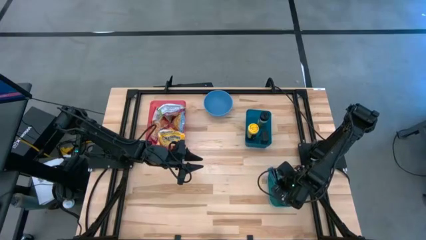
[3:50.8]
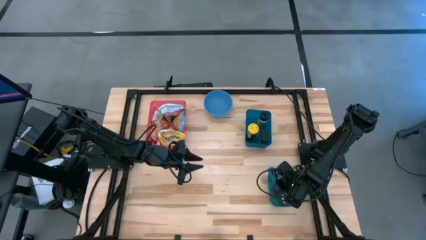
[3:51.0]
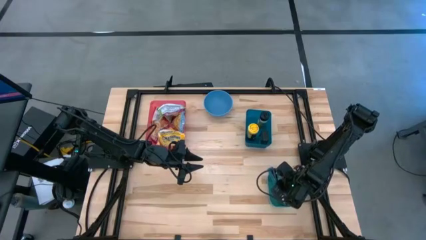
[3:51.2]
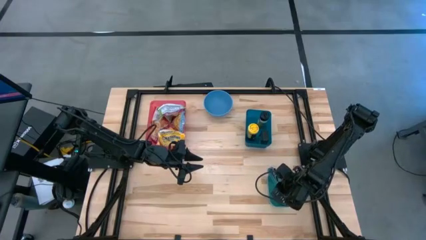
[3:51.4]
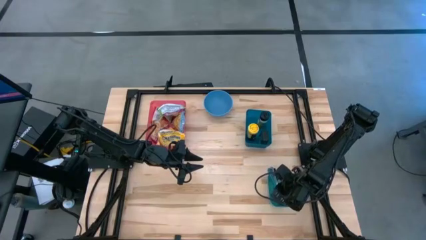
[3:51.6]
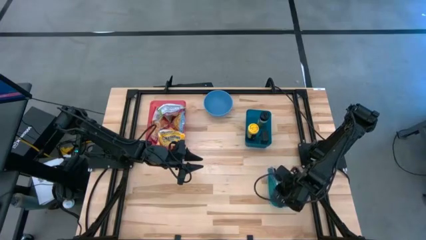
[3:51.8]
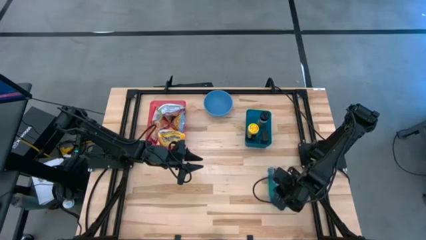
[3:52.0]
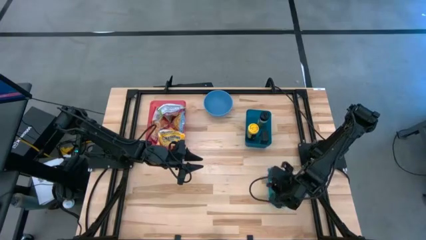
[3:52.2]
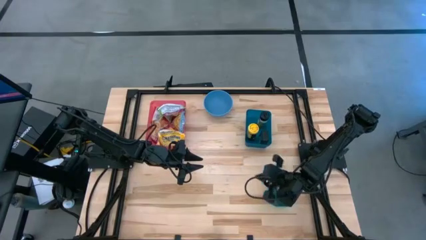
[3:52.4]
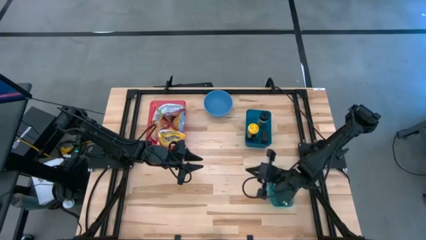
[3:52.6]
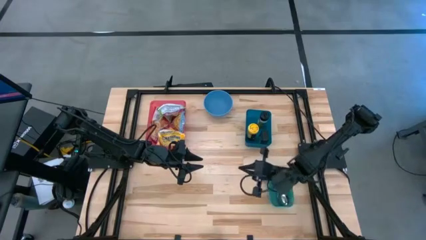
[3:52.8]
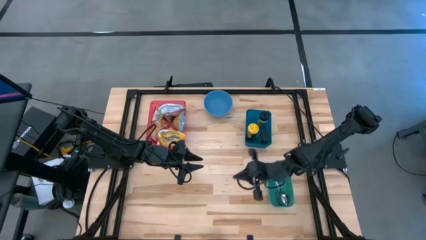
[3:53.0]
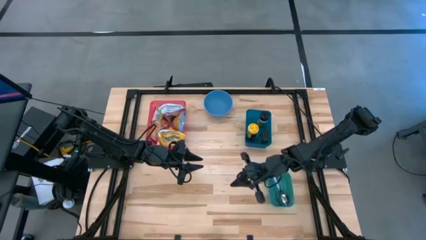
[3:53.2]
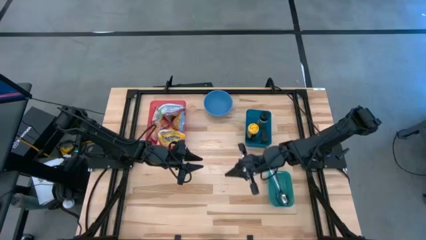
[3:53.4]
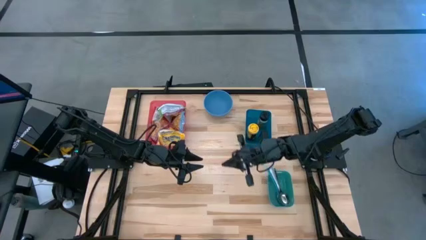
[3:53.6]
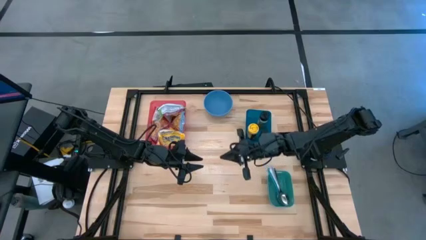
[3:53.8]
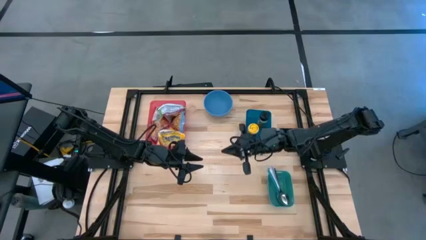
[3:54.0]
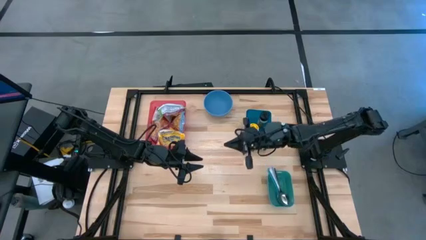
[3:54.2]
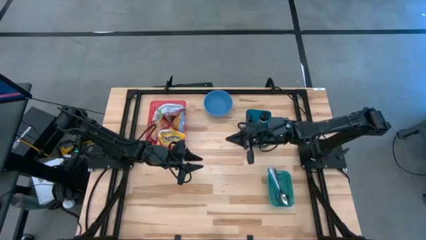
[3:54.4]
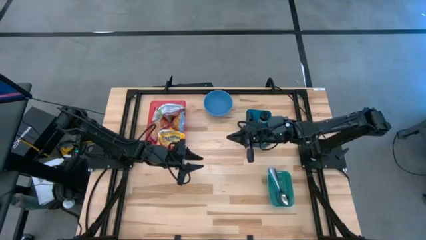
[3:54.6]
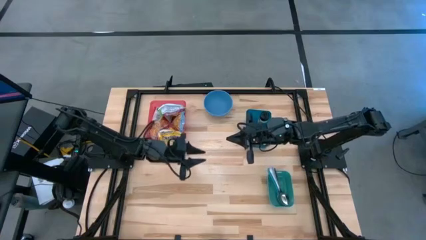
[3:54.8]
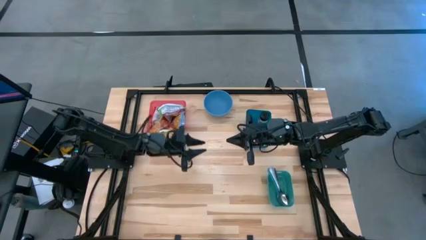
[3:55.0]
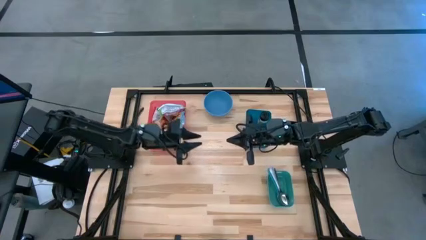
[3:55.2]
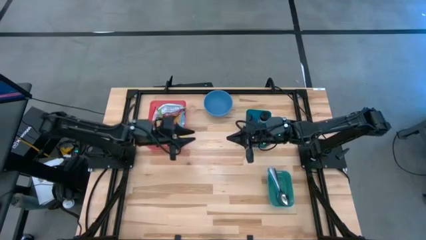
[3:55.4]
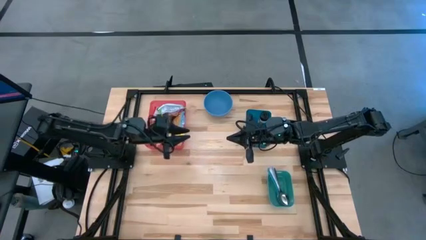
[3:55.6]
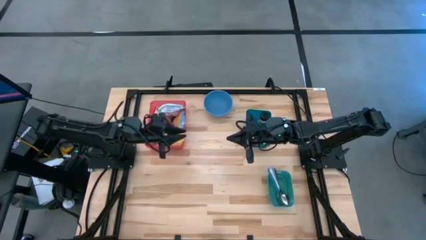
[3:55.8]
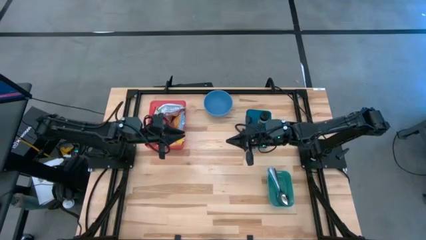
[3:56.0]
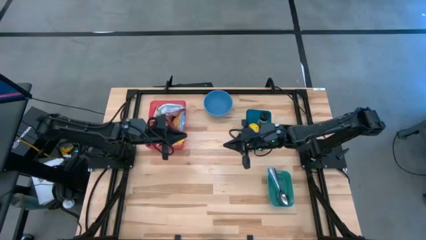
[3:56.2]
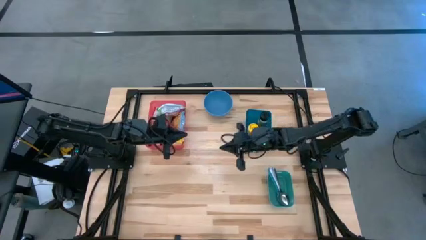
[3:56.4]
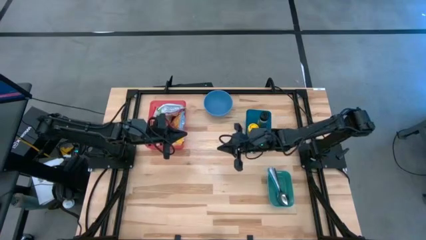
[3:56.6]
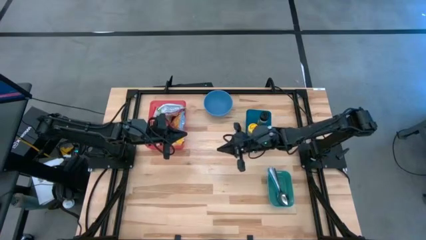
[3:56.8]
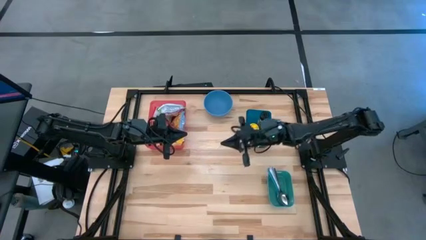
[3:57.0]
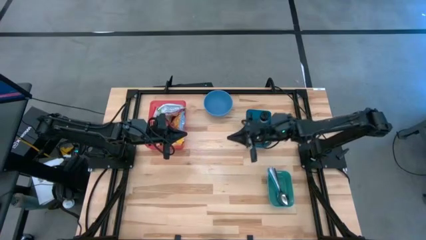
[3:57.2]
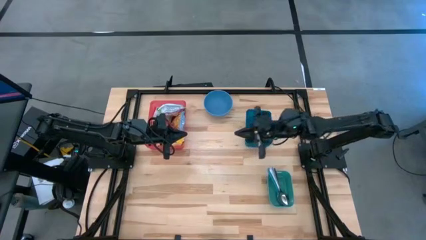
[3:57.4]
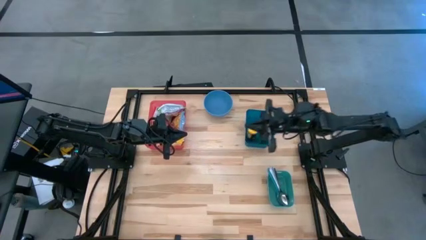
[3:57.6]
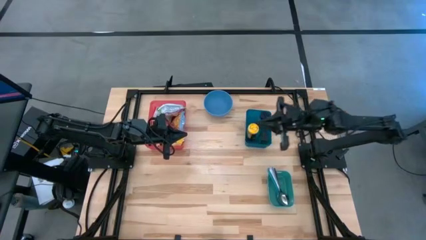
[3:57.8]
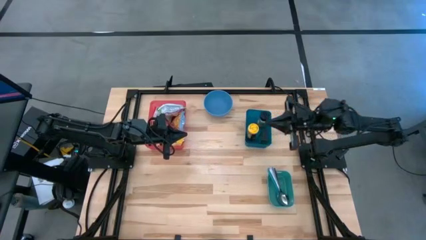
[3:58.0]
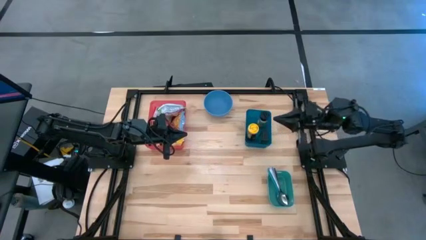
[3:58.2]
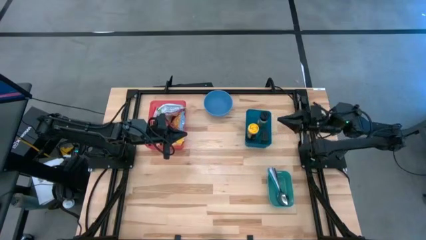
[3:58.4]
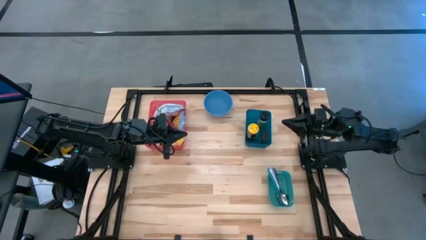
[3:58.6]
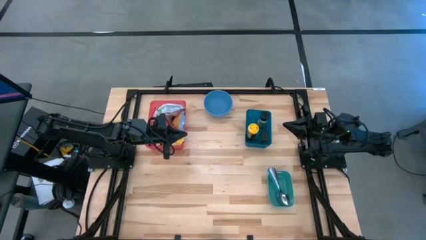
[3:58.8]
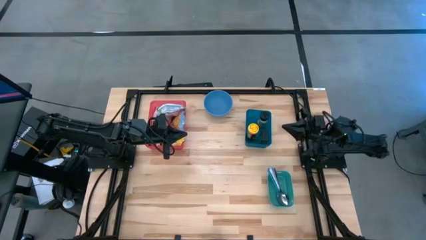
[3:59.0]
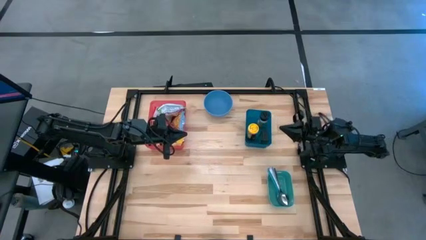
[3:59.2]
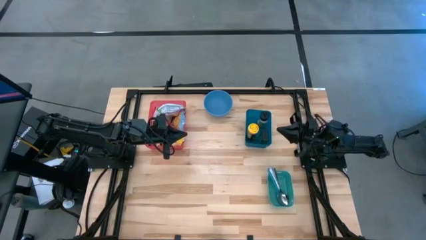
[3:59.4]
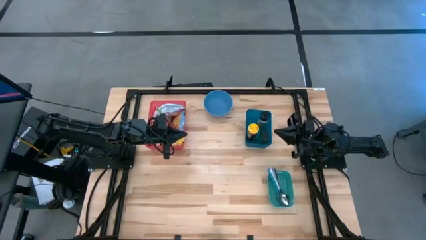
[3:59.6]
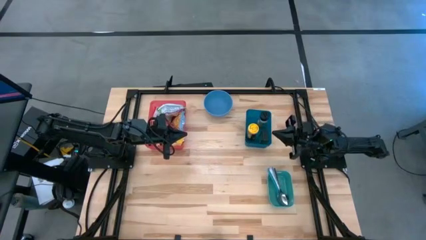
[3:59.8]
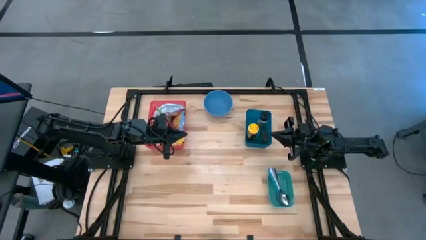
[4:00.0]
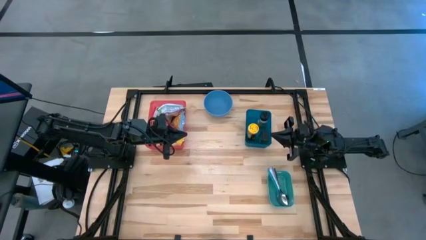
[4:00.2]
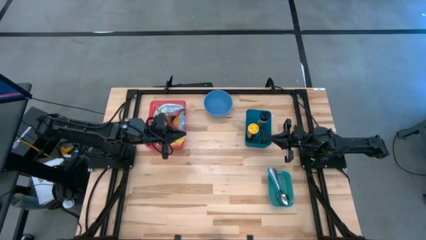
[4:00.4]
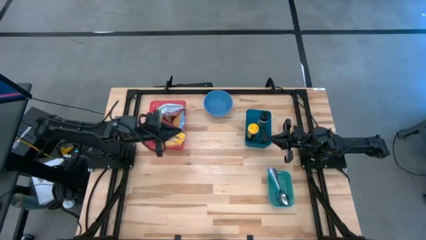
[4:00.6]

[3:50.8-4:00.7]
Task: Pick & Place Food Item
Return to Home Position

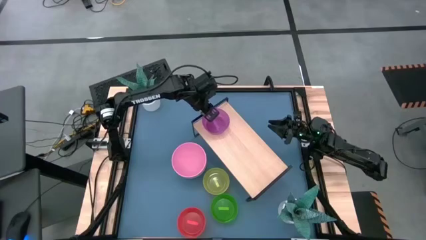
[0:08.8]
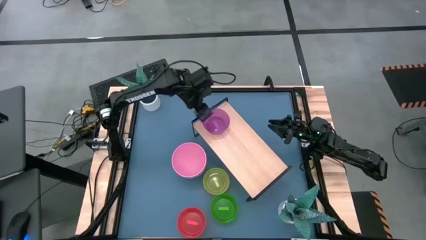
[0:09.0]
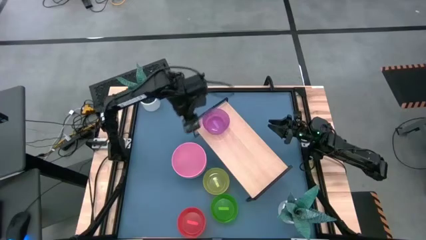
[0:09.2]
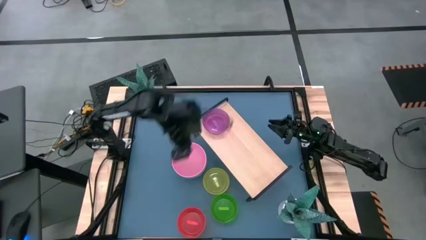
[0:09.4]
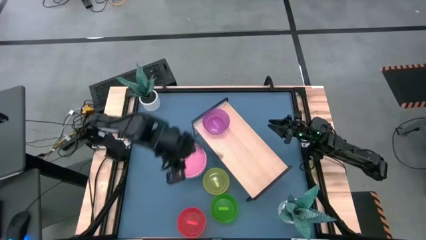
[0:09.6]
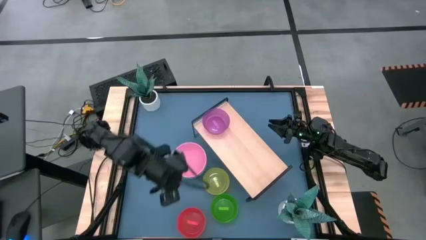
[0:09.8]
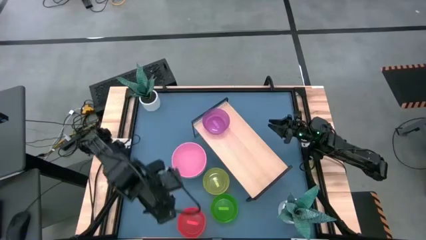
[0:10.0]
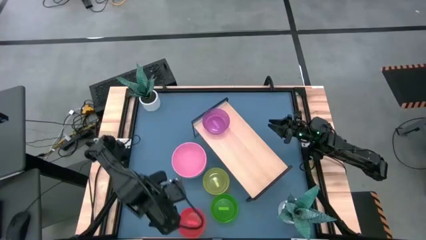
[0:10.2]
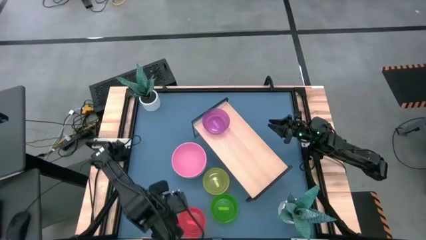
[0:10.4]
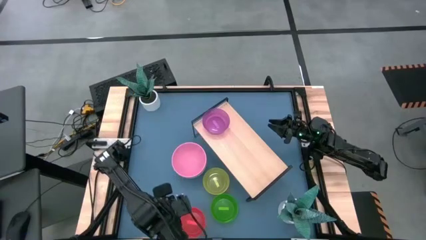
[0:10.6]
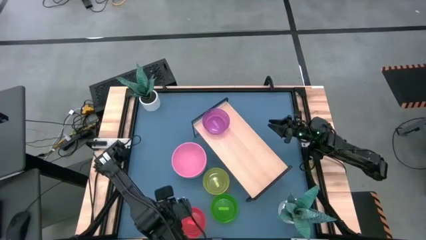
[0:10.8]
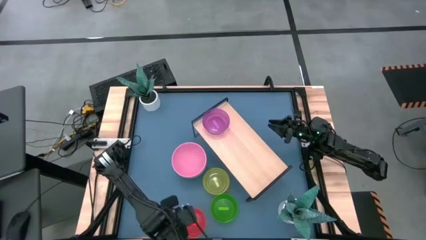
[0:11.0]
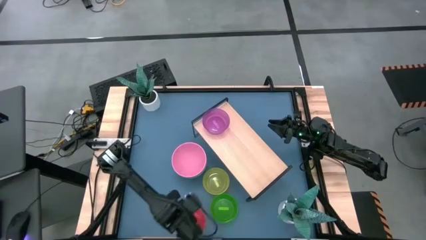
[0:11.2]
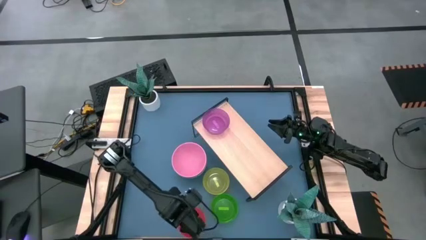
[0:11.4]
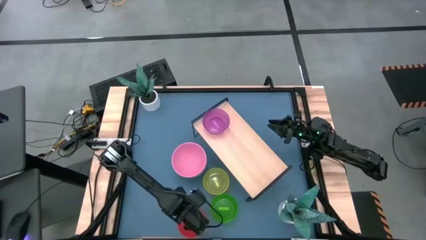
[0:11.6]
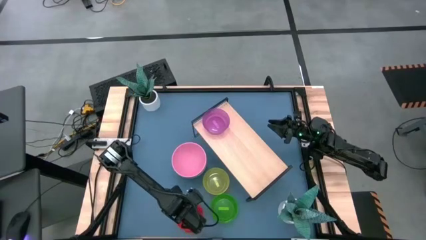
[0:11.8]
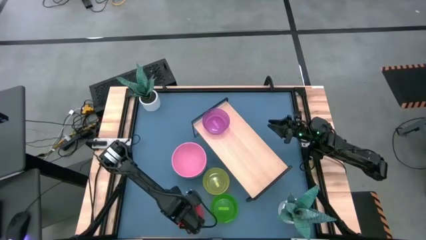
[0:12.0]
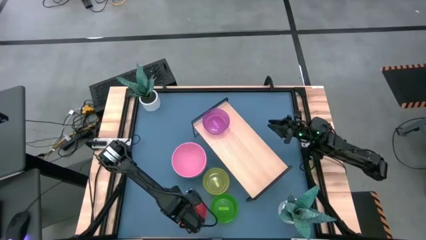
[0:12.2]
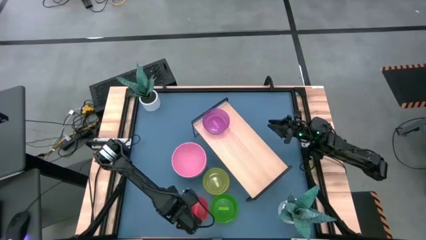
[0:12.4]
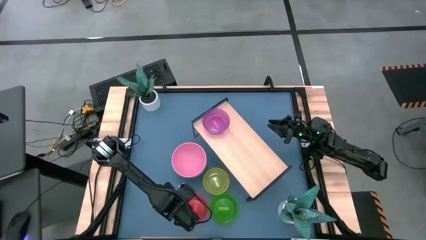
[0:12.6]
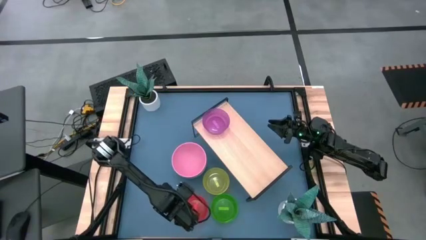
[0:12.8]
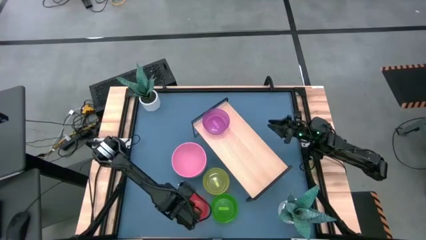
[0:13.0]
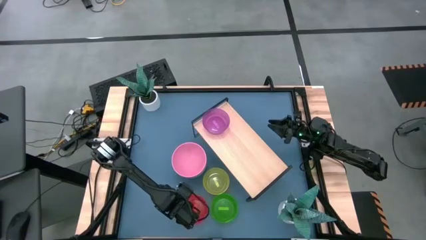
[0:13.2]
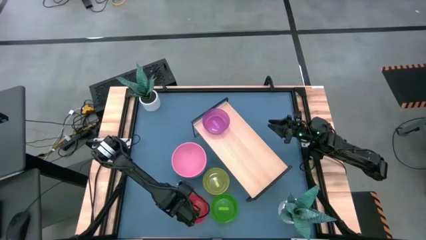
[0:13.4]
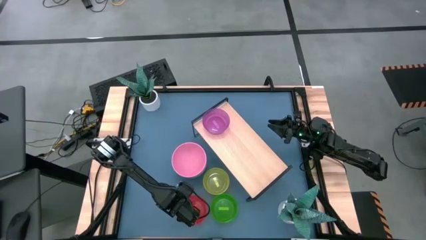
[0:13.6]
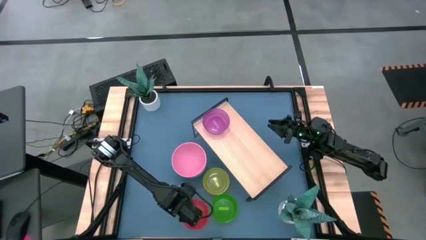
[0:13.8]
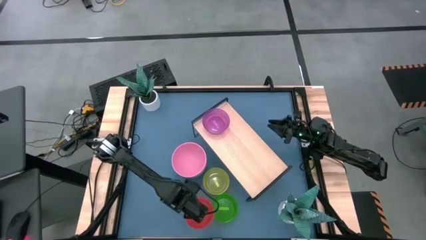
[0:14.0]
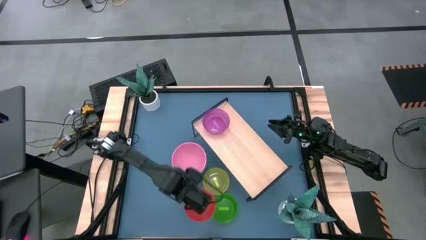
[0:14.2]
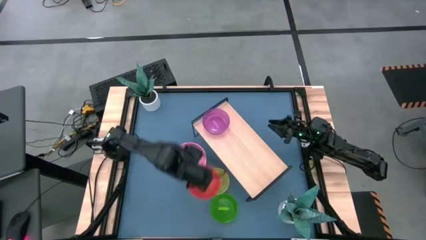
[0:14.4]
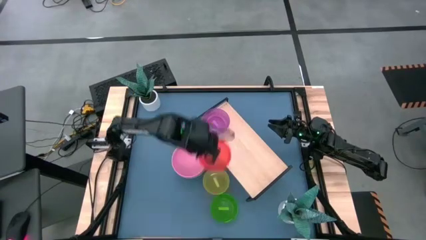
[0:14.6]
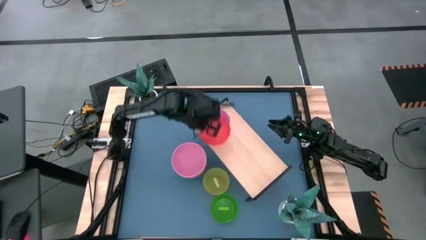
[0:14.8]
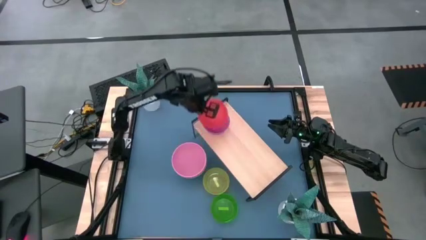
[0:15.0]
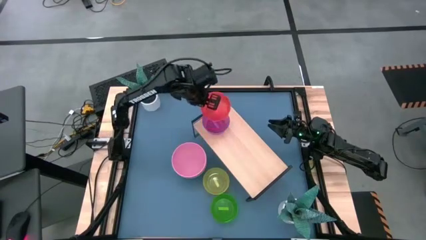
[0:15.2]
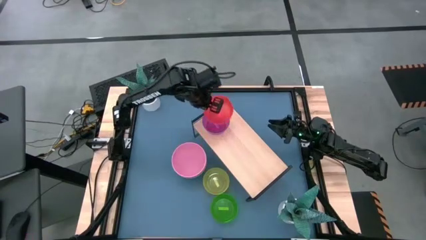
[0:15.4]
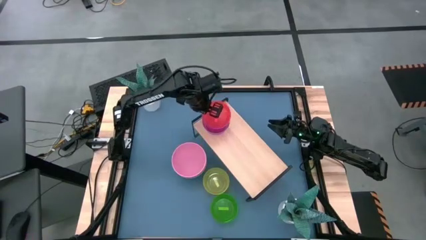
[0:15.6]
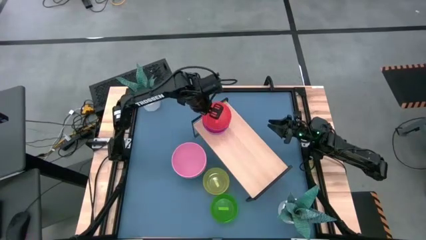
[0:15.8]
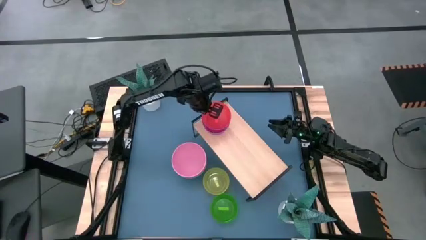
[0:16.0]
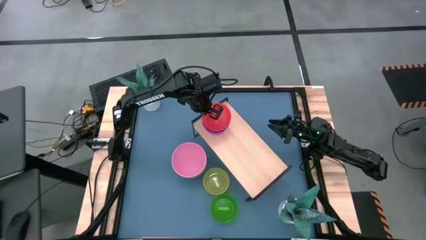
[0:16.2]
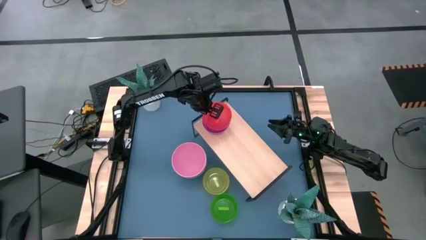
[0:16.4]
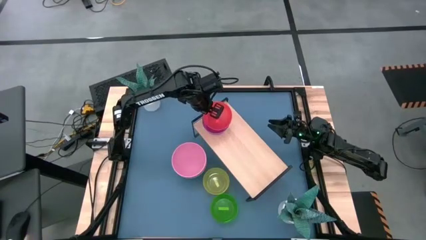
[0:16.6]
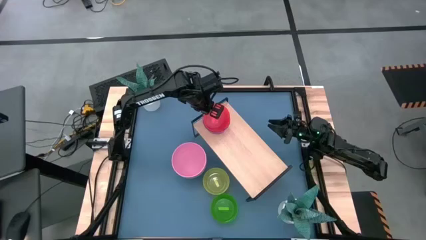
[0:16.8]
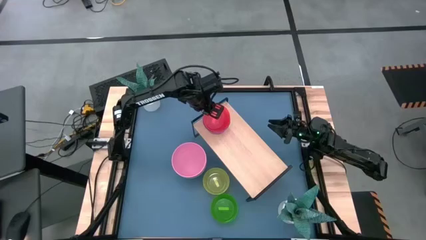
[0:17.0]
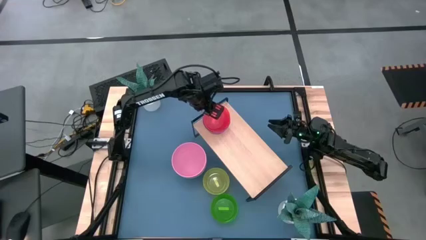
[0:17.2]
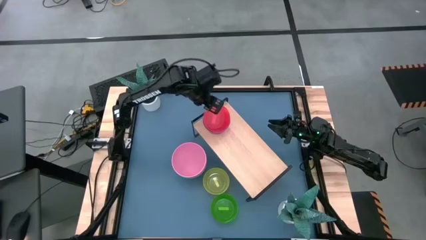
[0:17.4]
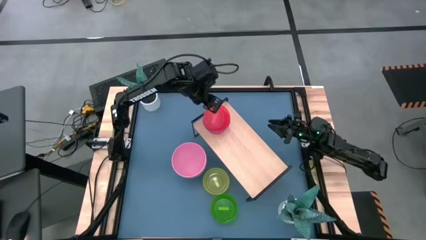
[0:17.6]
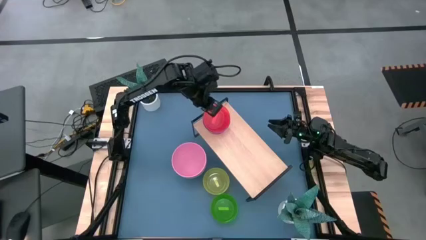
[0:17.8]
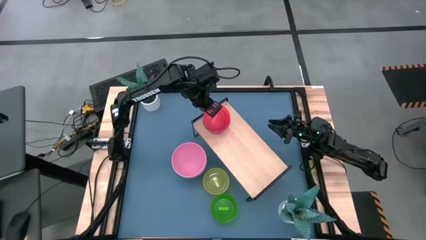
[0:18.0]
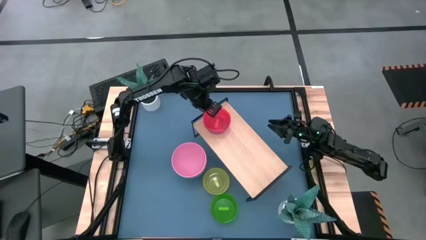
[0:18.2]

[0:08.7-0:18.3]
Task: Place and stack bowls onto a shelf
Stack the orange bowl on top of the purple bowl on the shelf
